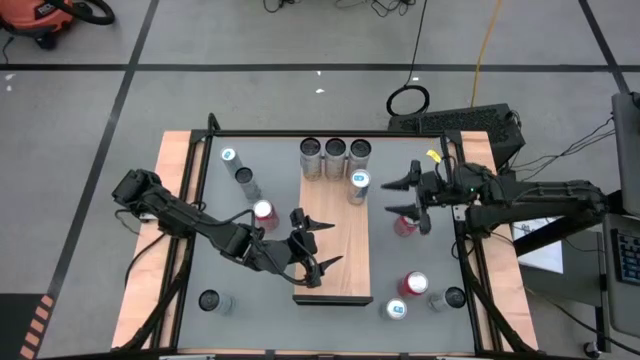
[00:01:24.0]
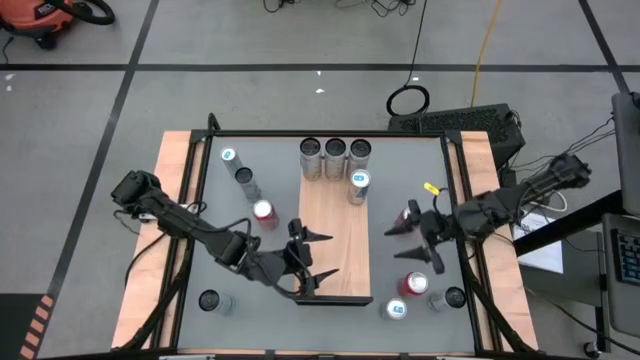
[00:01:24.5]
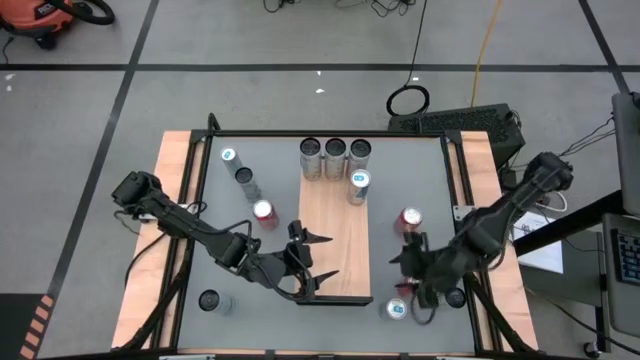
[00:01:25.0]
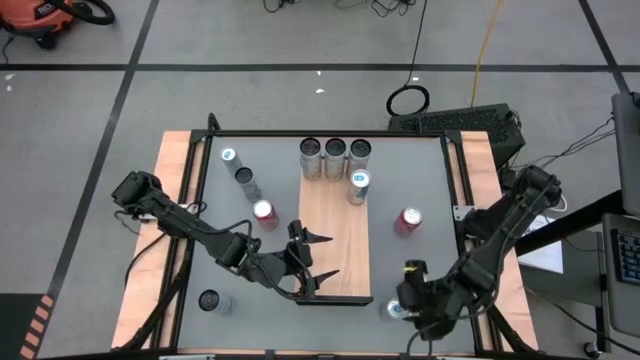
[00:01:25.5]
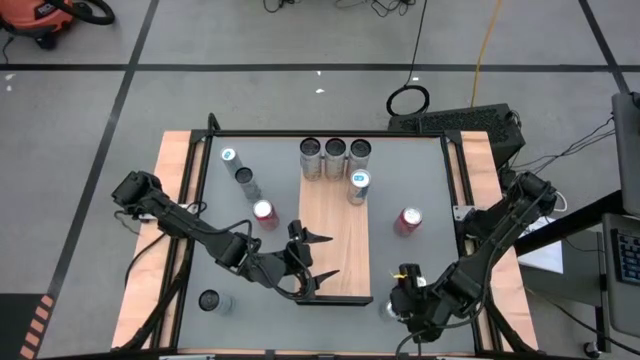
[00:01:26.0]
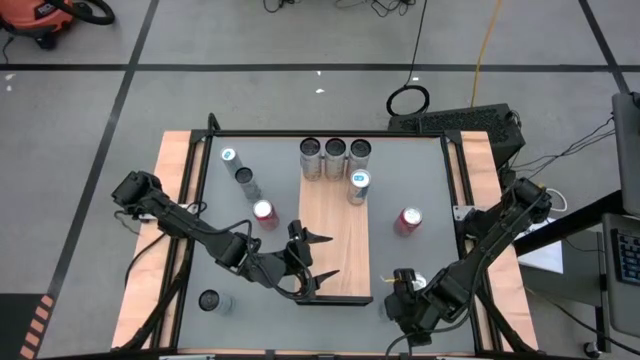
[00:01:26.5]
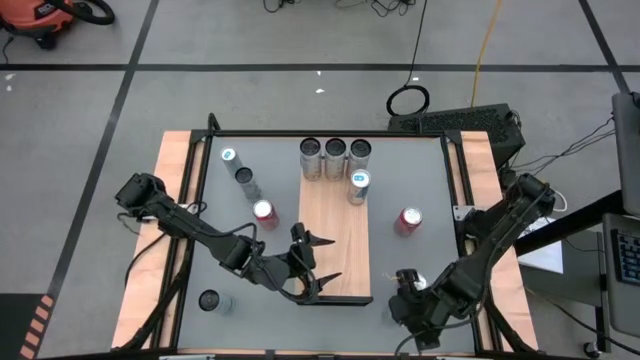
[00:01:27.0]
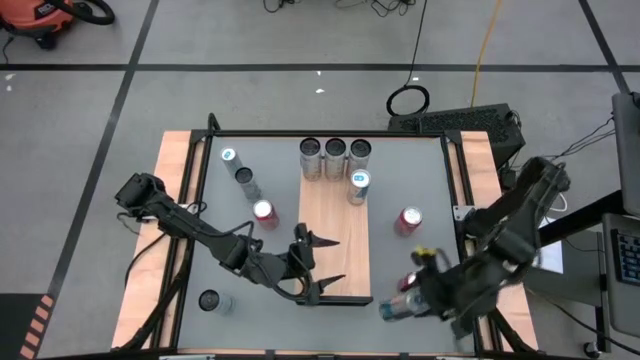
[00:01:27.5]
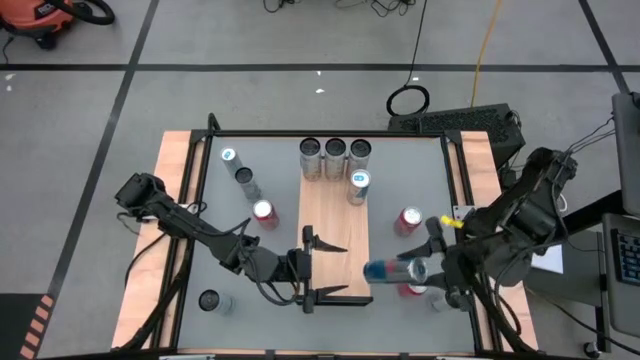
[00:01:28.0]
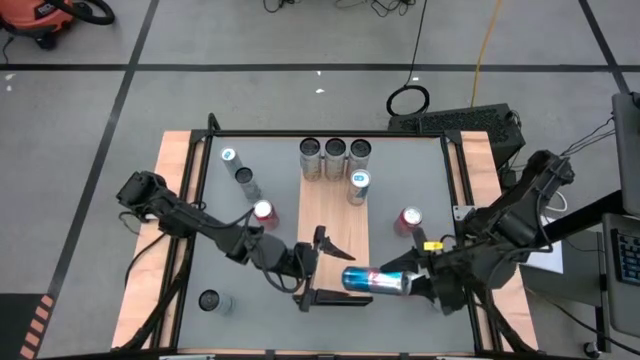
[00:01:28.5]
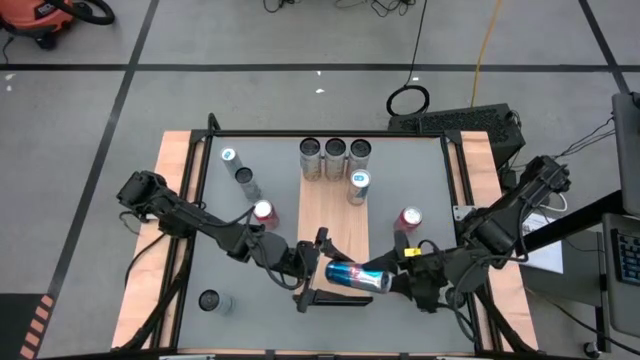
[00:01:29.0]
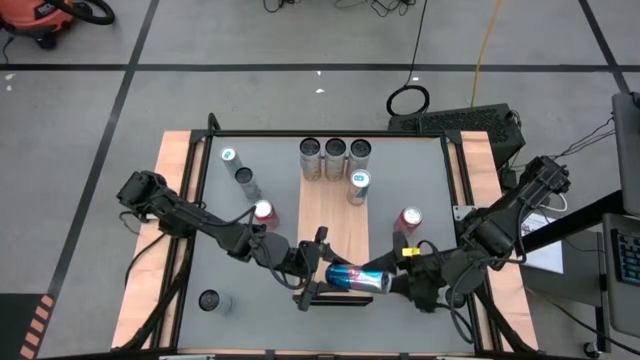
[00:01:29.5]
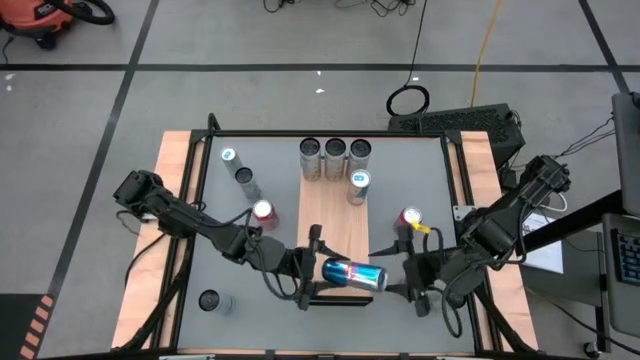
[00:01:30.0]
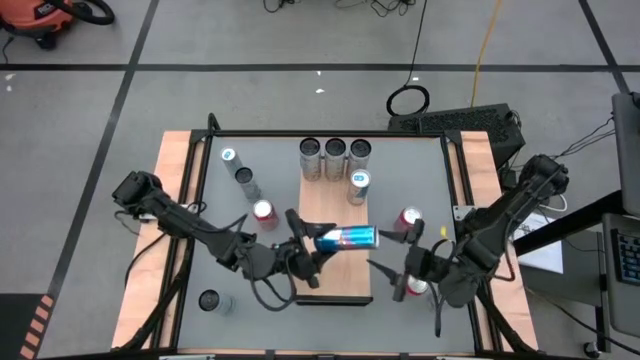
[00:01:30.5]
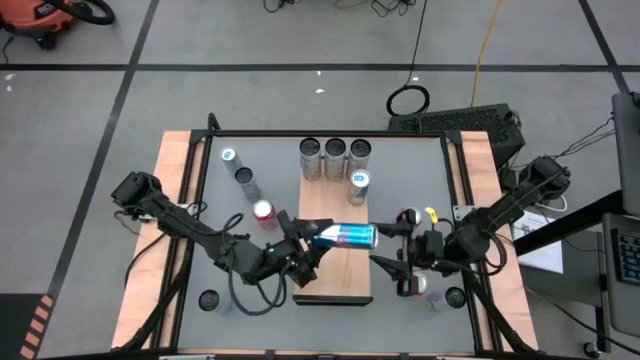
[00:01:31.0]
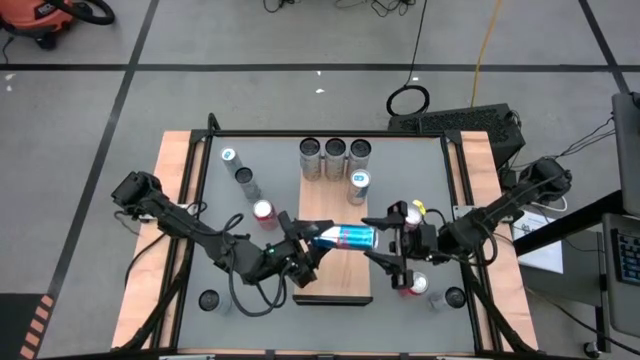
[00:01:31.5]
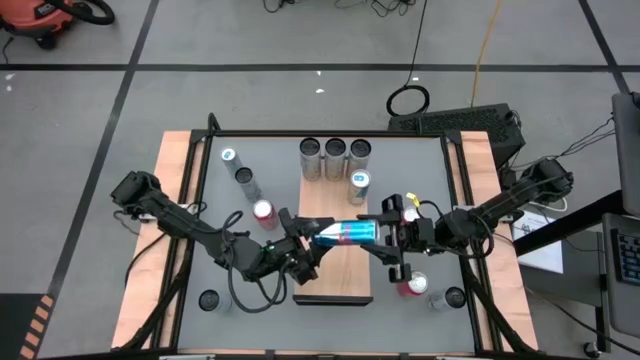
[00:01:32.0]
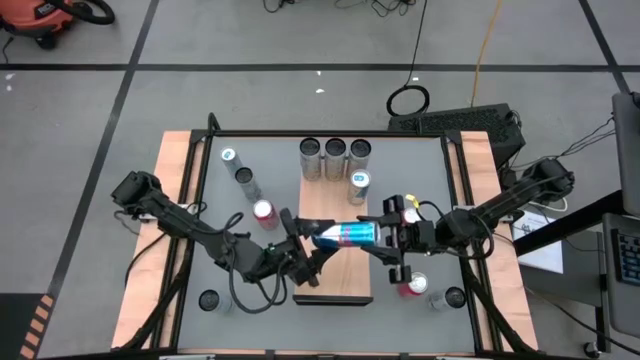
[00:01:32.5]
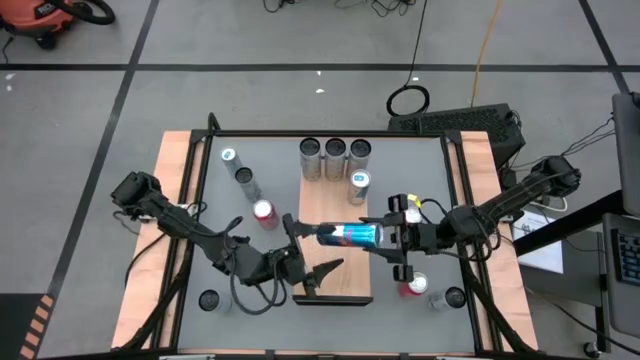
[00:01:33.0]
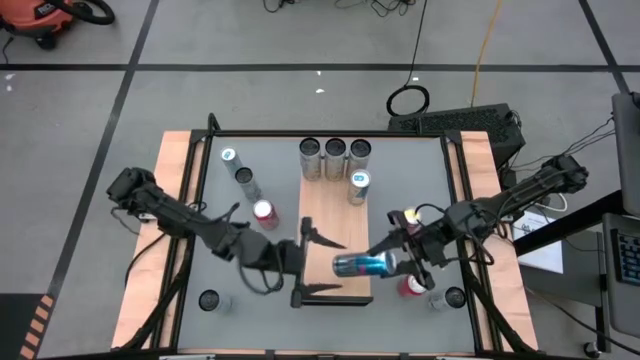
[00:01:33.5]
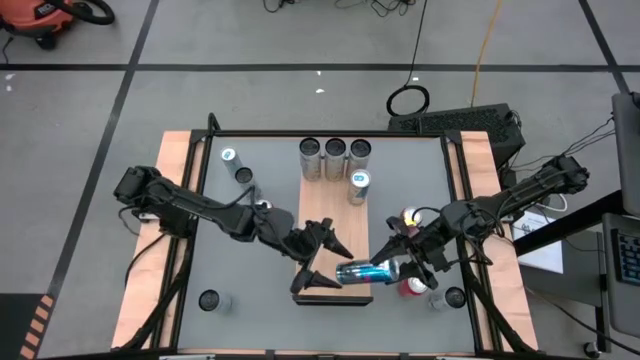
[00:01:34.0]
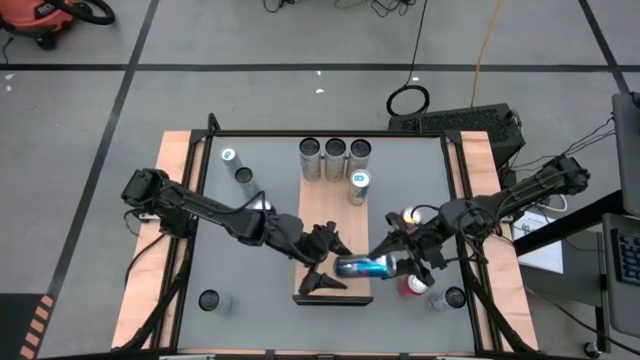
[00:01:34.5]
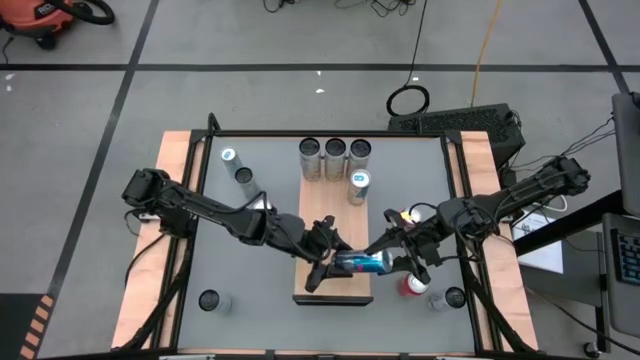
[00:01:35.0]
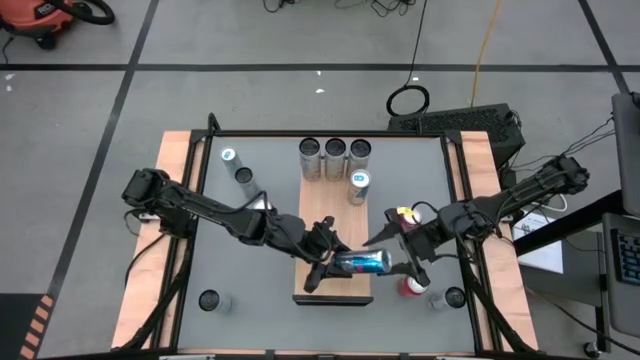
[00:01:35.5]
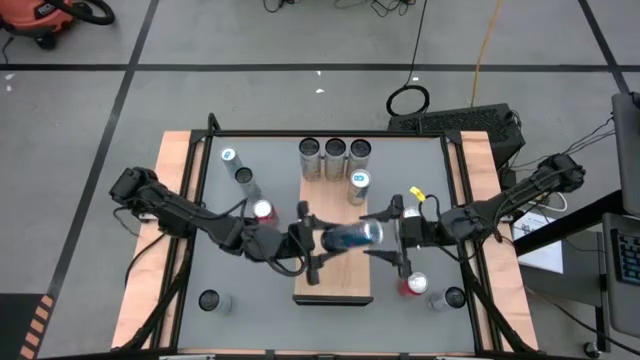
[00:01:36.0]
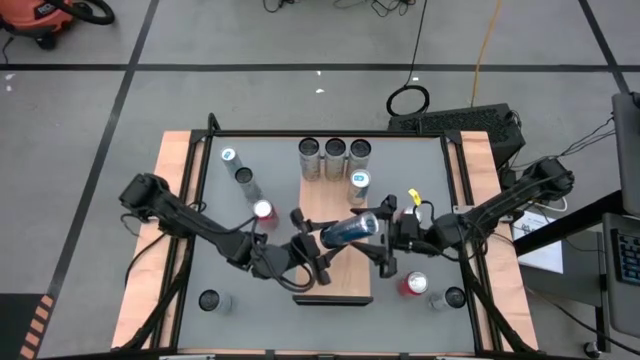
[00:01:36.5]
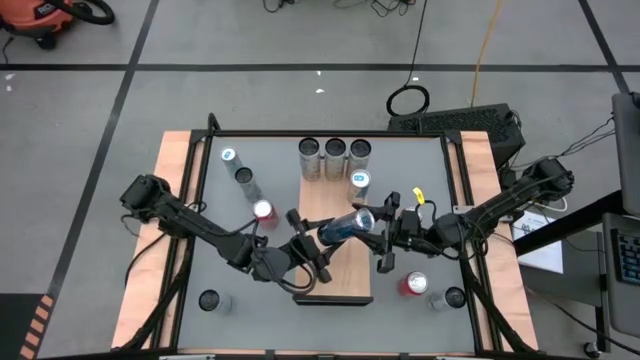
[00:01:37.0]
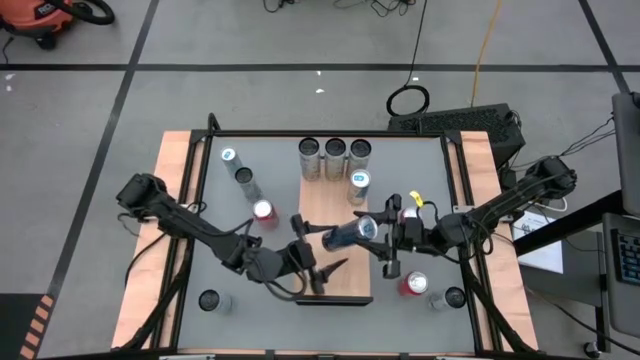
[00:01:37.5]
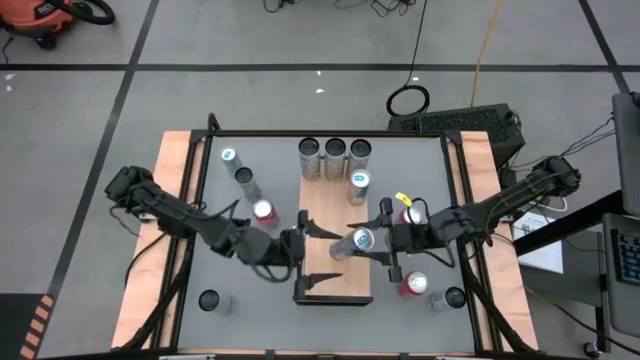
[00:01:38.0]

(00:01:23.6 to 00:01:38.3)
Task: Place canned beverage on shelf
Put the right blue soda can on the shelf aligned with the other blue soda can

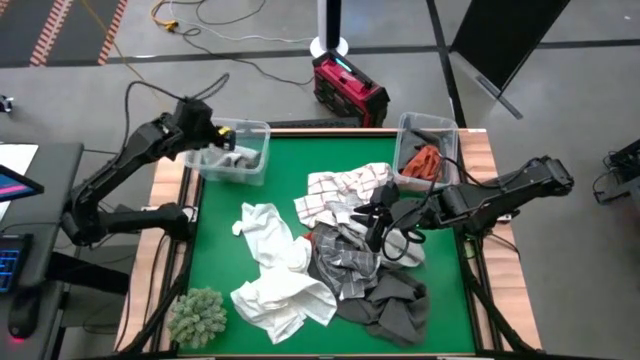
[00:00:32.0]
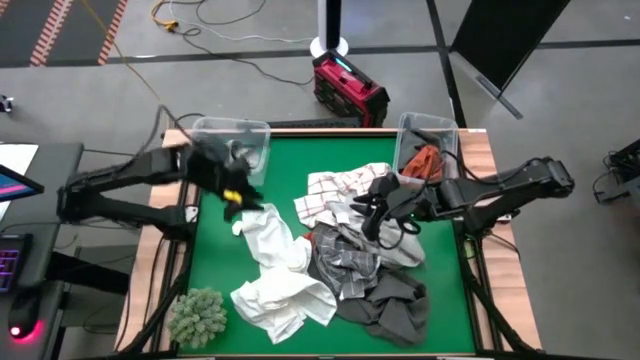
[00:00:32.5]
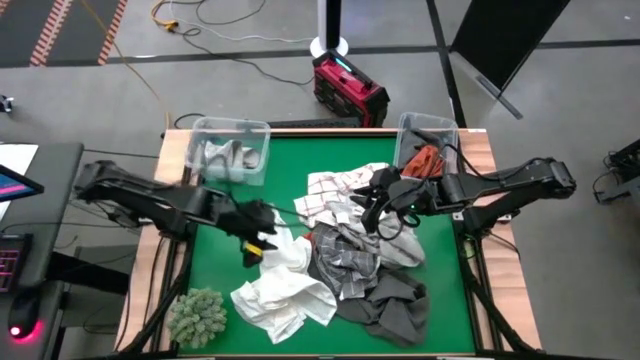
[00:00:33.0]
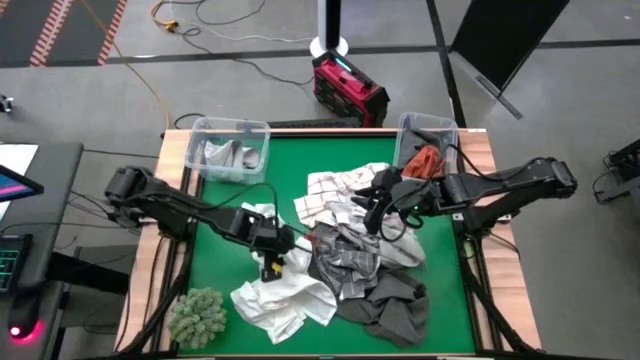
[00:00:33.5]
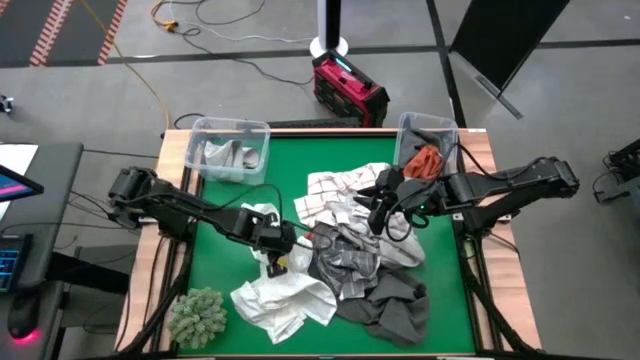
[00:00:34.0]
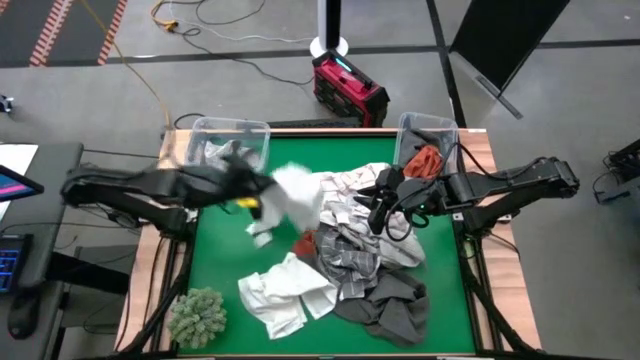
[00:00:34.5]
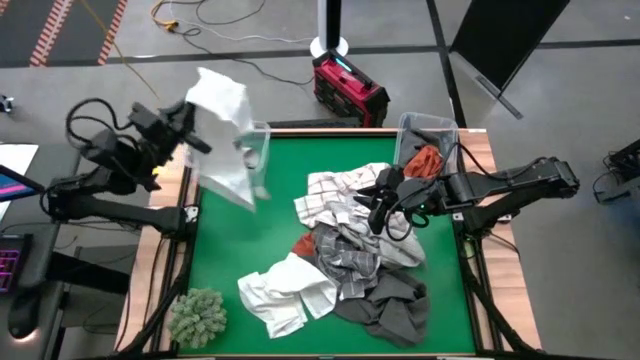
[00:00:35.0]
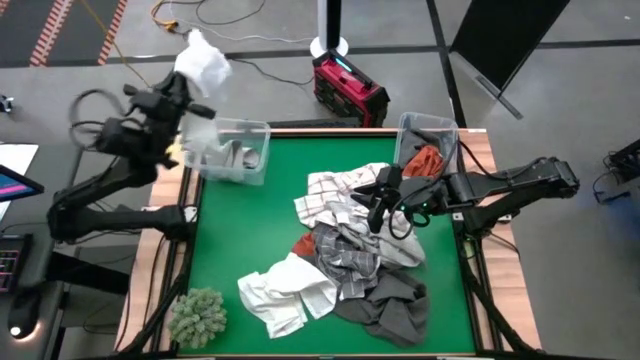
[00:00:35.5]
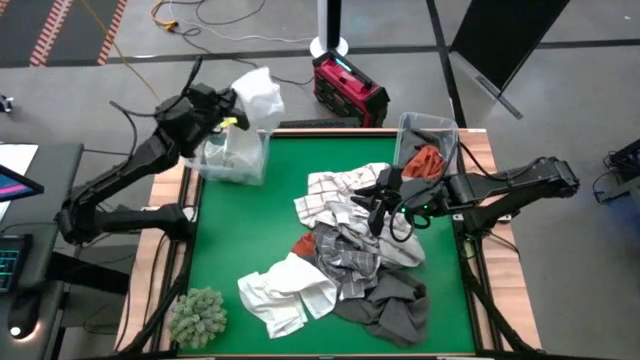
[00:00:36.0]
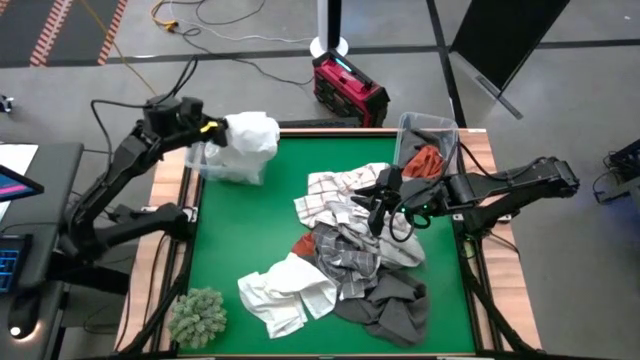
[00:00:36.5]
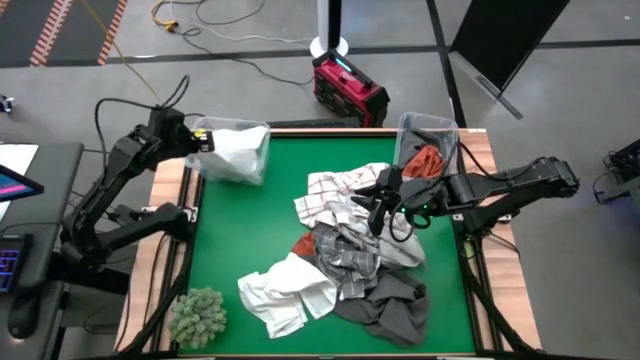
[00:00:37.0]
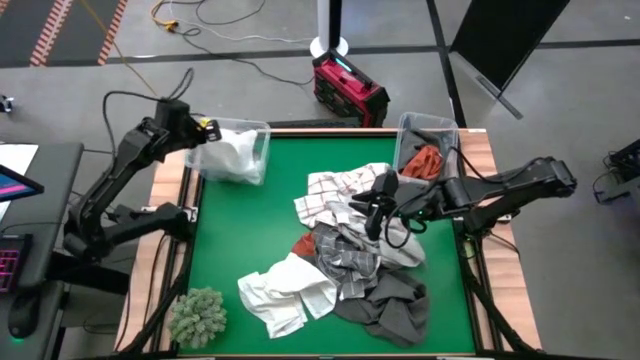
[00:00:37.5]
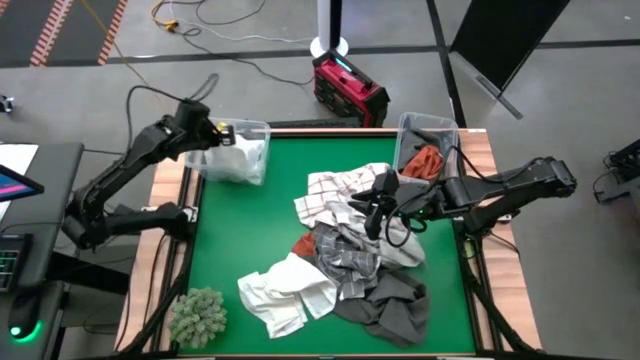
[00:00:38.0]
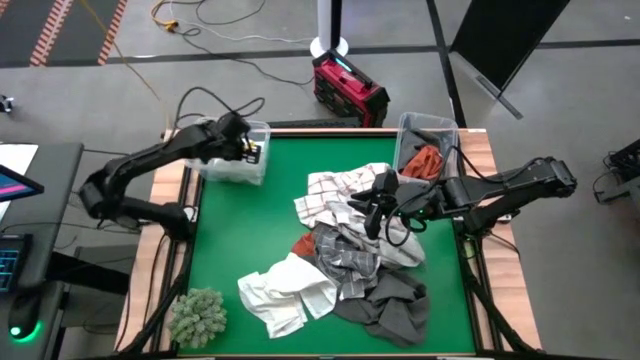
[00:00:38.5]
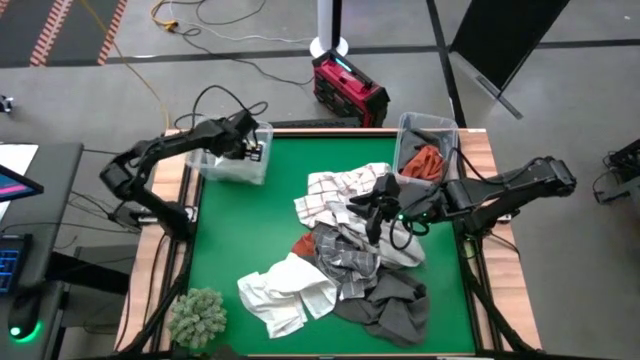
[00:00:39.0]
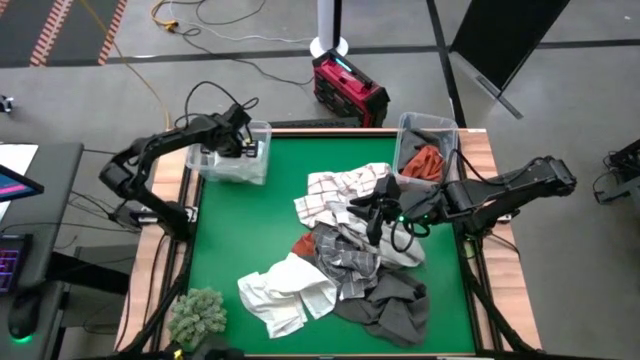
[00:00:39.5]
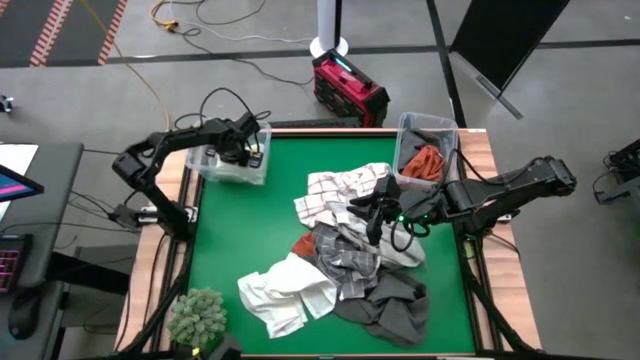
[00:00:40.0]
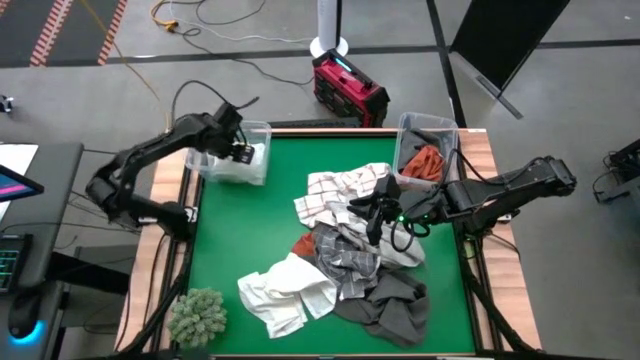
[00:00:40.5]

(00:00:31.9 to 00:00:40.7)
Task: Sort towels by color in basket
Put the white towel into the left transparent bin
